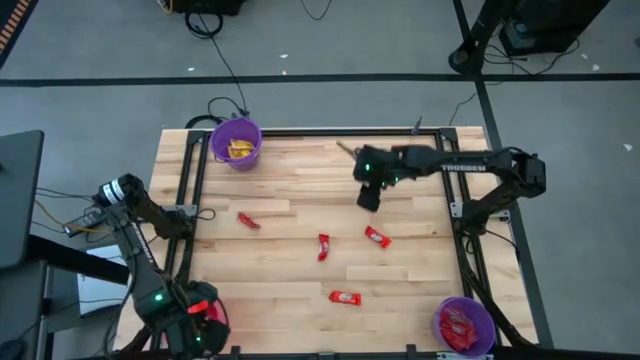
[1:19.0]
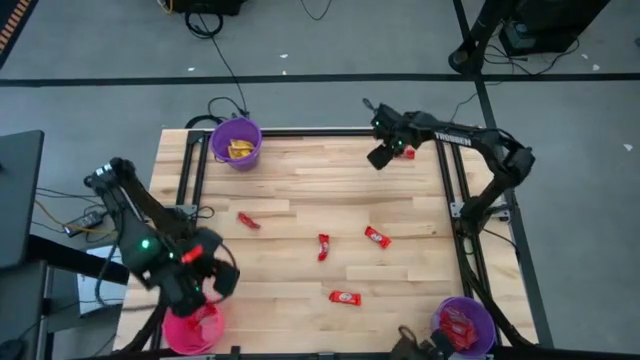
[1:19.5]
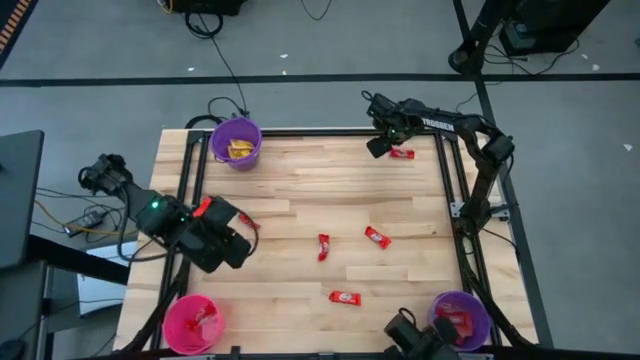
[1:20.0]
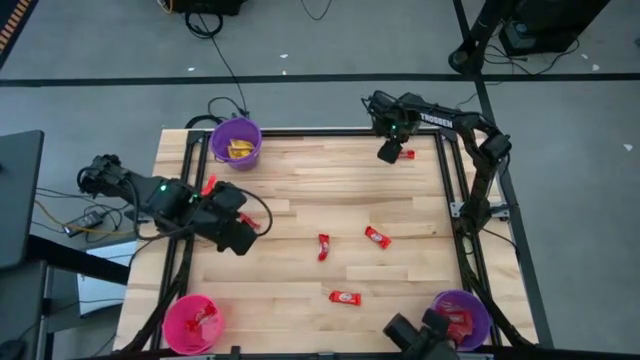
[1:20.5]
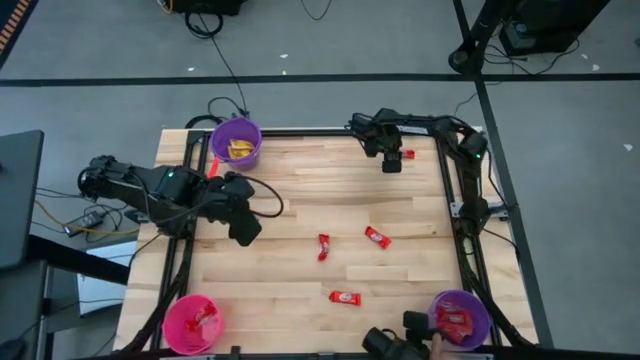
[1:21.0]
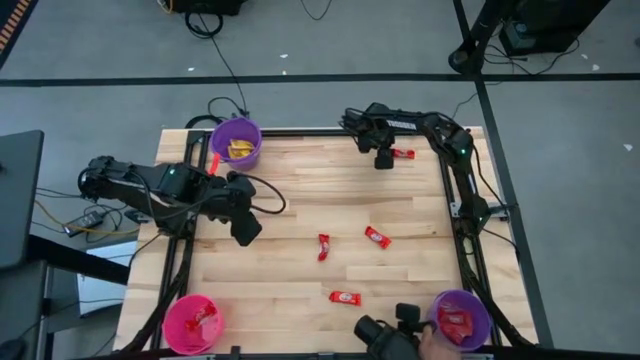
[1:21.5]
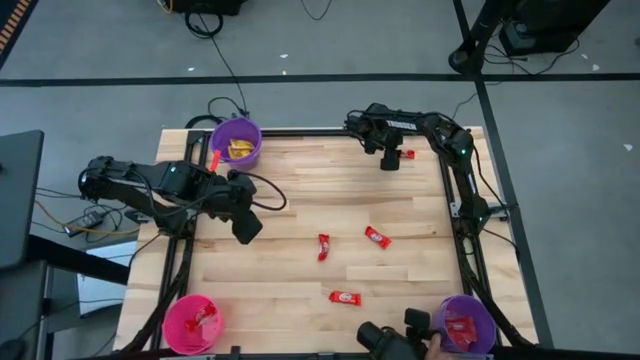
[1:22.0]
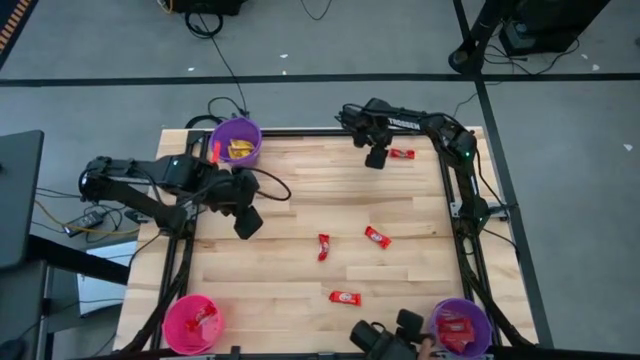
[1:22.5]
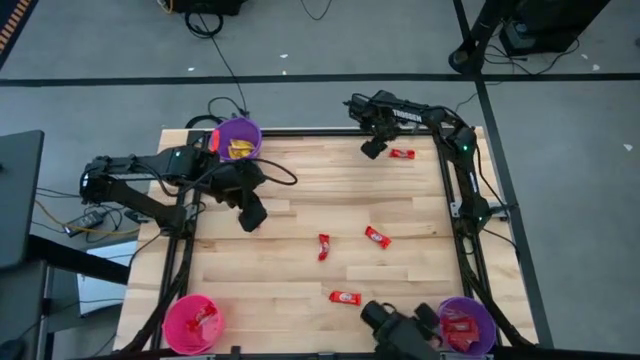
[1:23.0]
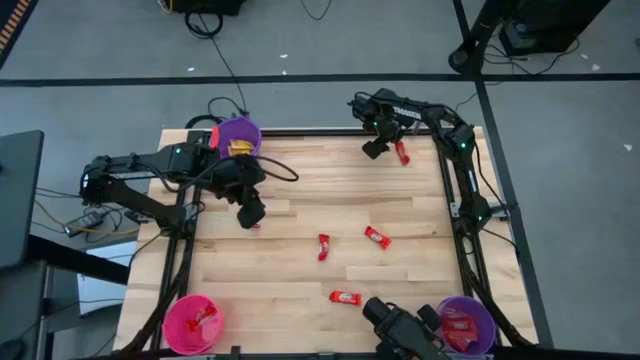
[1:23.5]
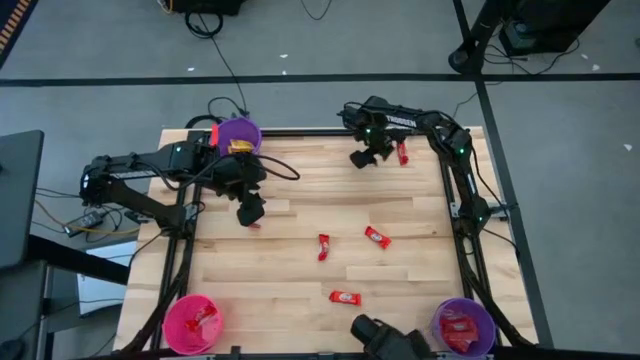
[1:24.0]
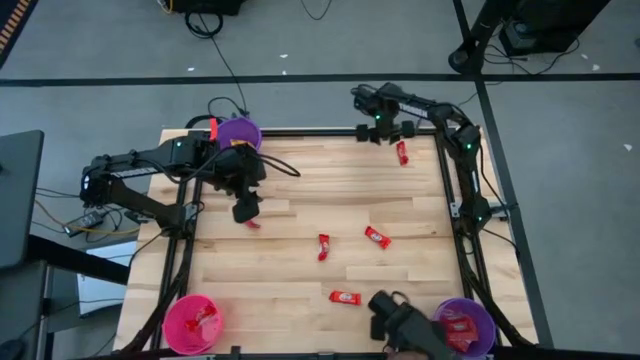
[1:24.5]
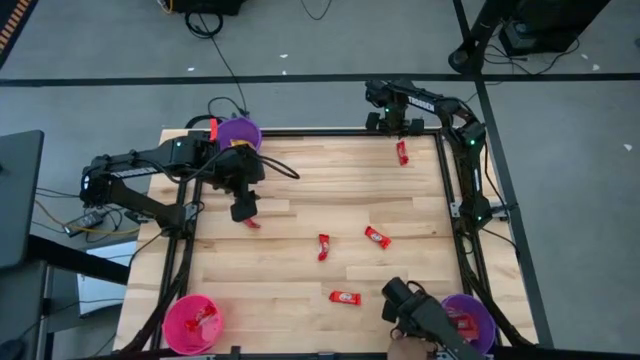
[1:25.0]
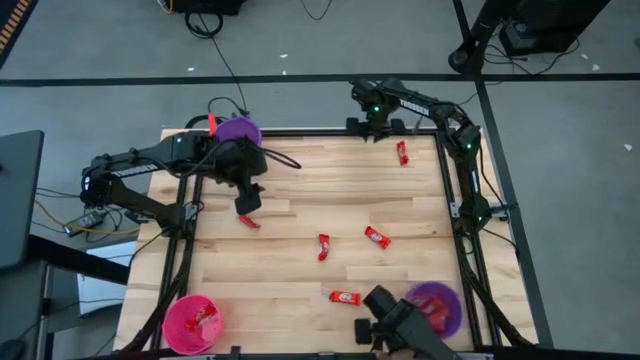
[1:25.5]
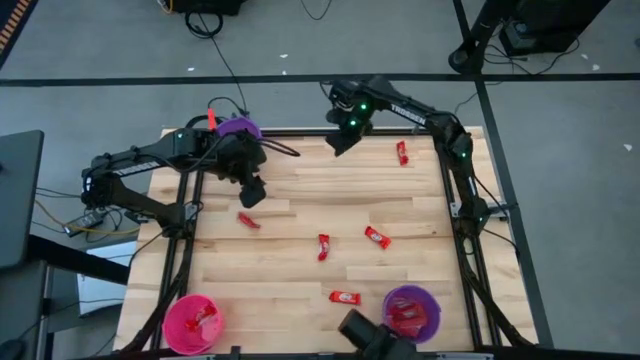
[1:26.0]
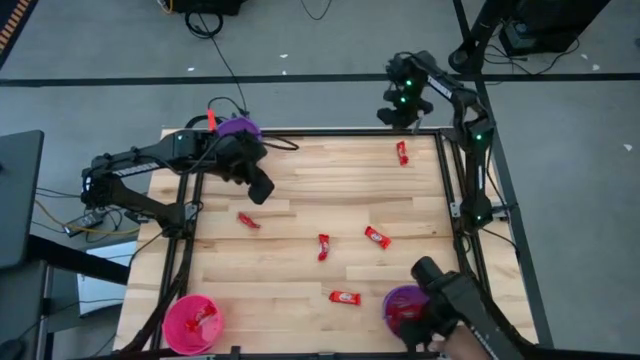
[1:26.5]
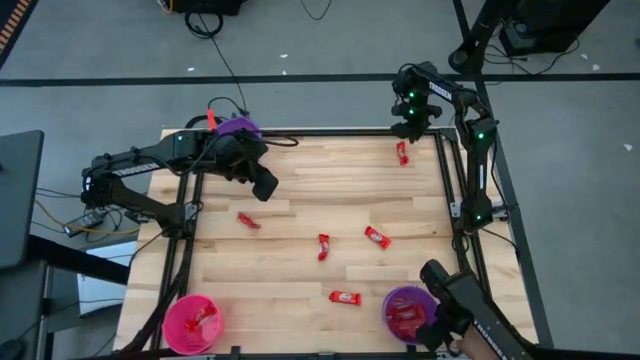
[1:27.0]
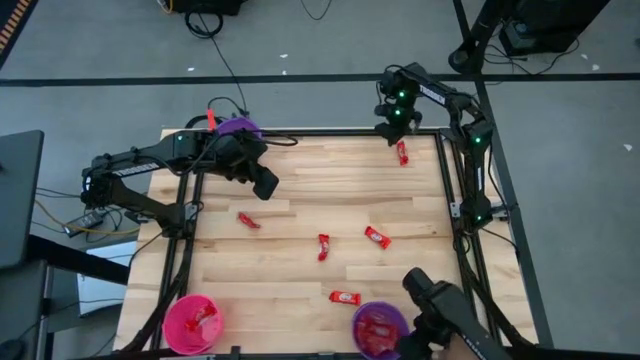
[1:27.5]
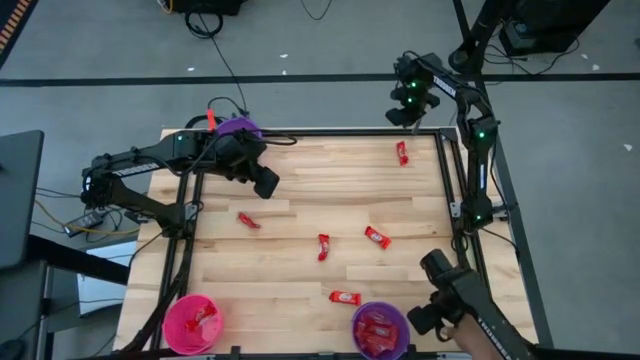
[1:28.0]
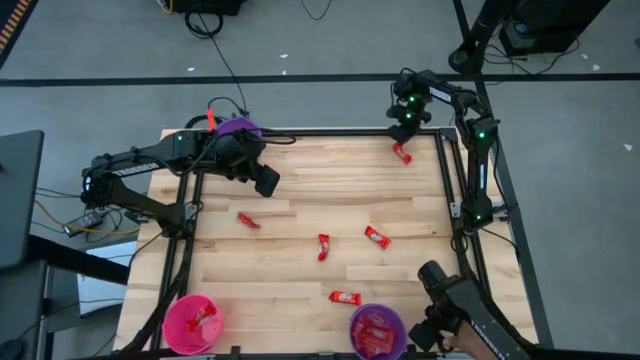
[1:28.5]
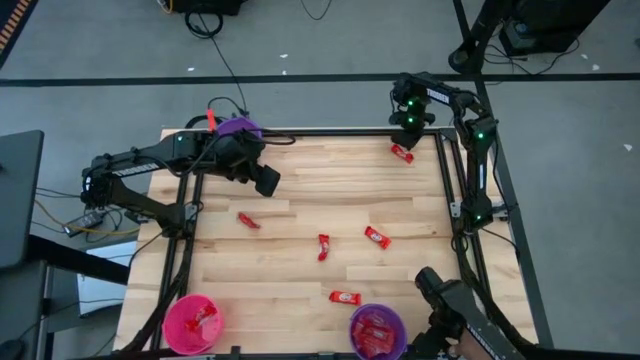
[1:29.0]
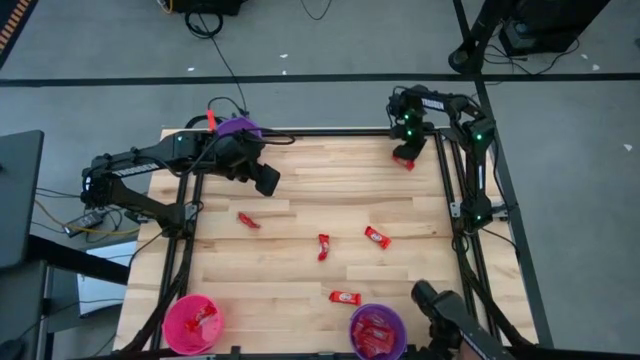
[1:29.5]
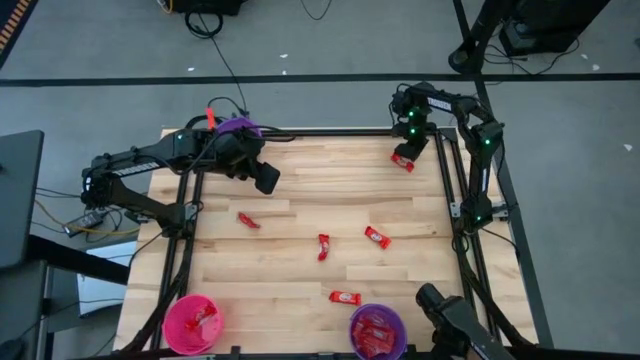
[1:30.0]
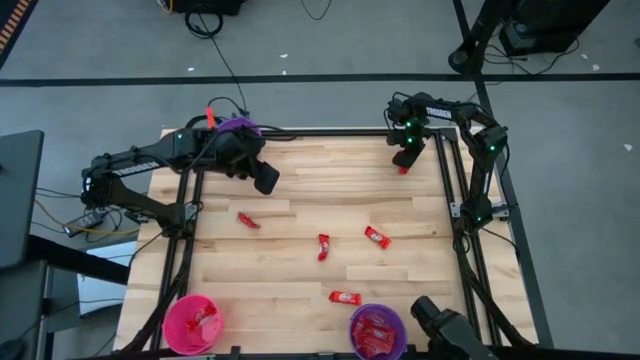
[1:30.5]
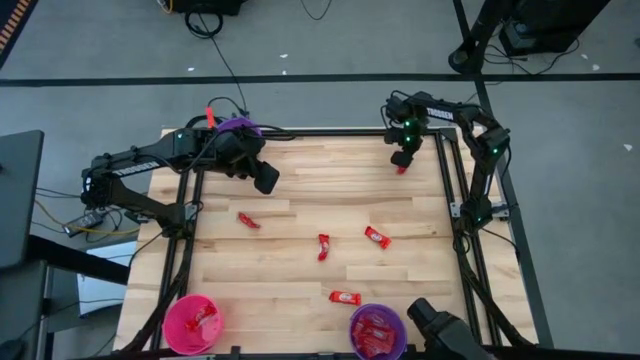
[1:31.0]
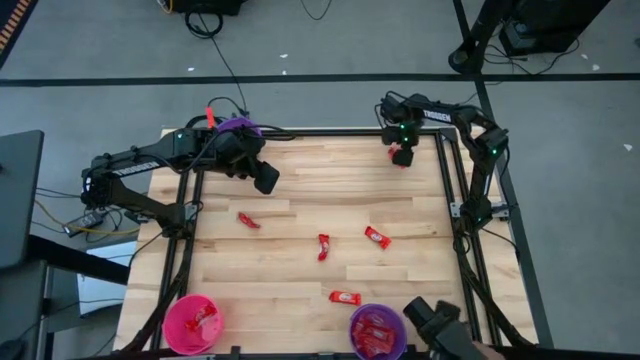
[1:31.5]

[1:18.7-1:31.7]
Task: Sort candy by brand, put in halloween buckets
Put the red chocolate into the pink bucket

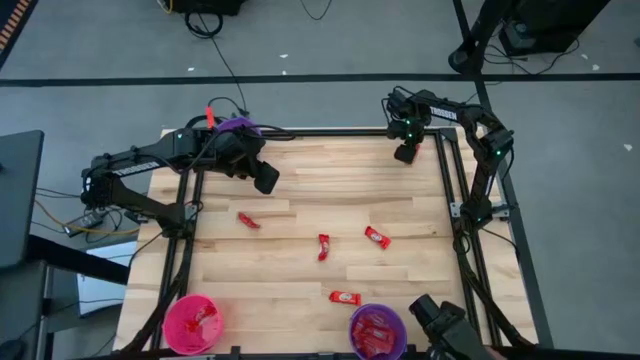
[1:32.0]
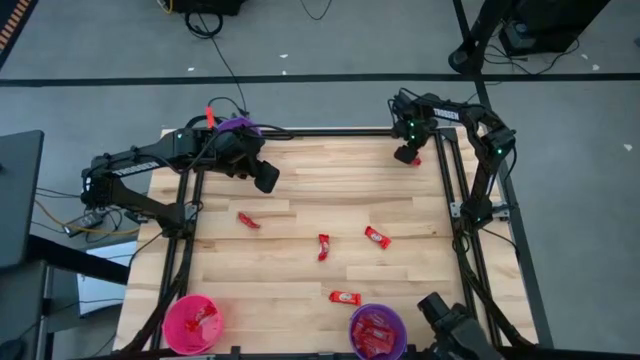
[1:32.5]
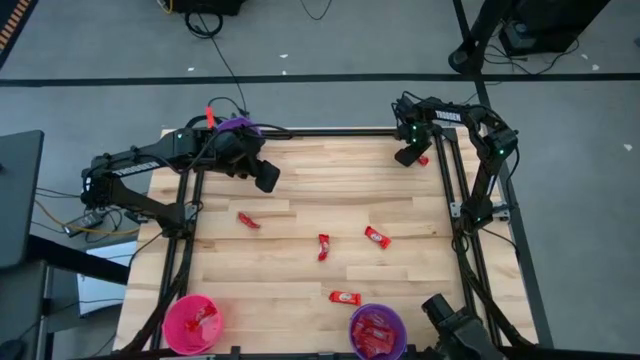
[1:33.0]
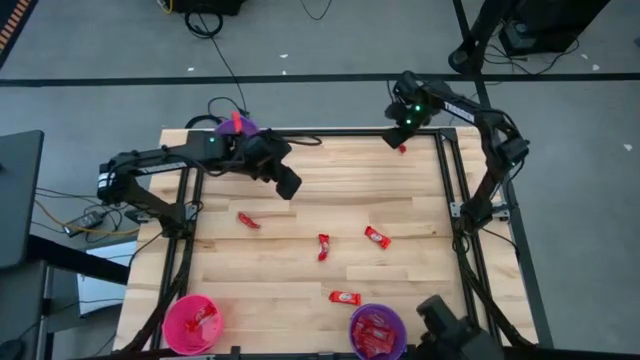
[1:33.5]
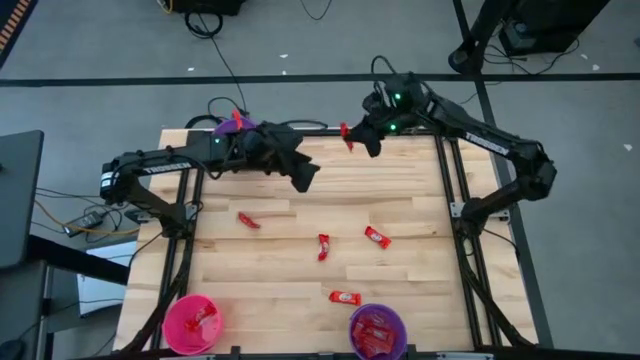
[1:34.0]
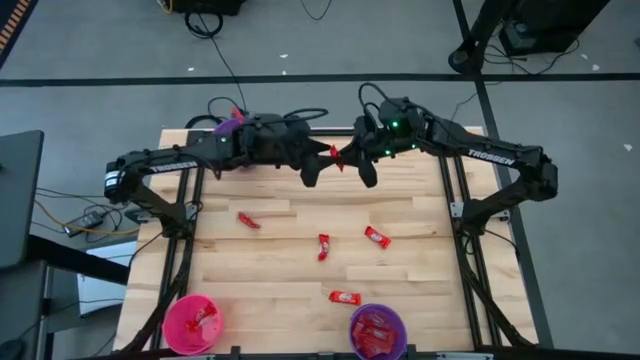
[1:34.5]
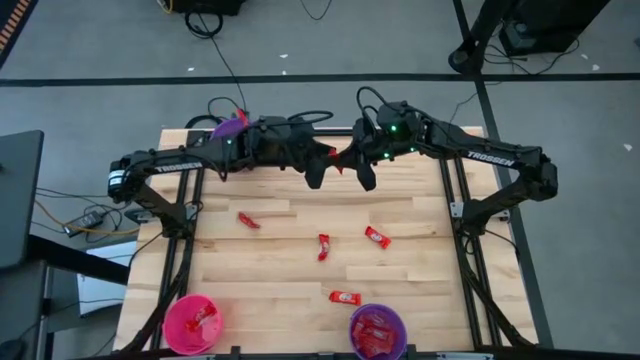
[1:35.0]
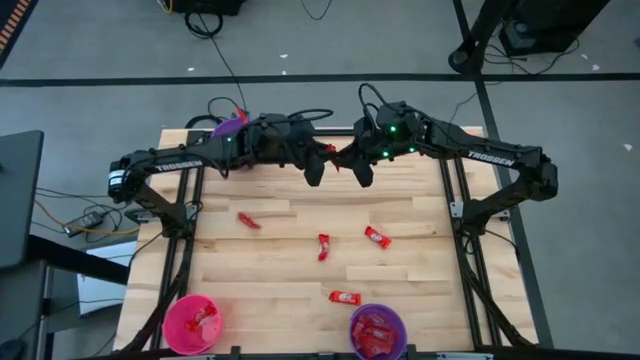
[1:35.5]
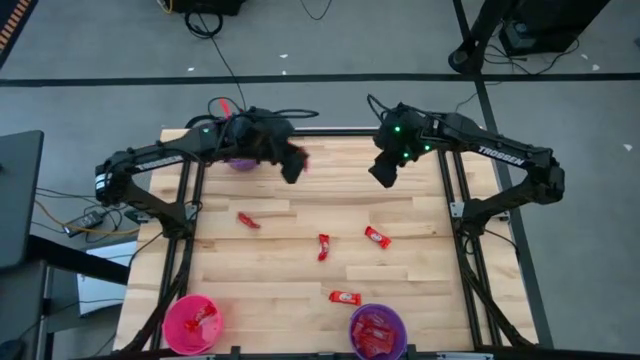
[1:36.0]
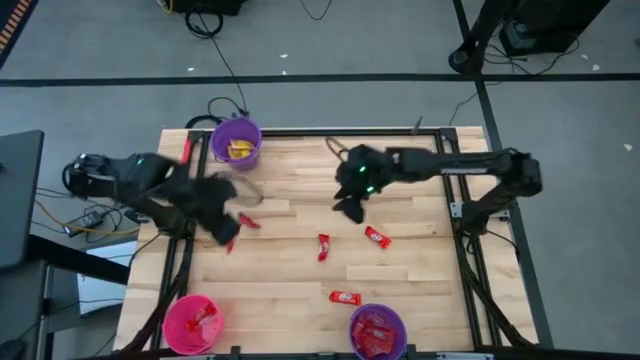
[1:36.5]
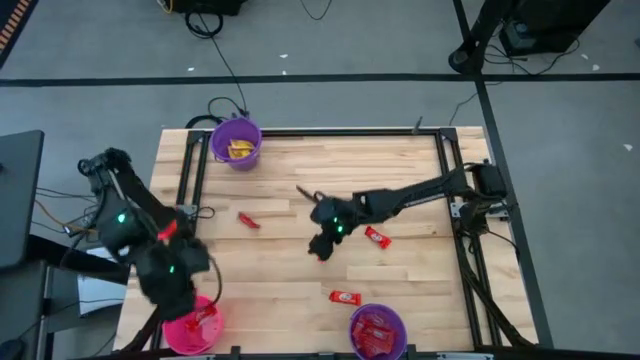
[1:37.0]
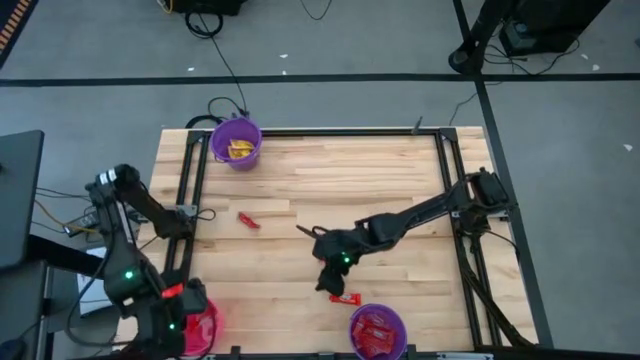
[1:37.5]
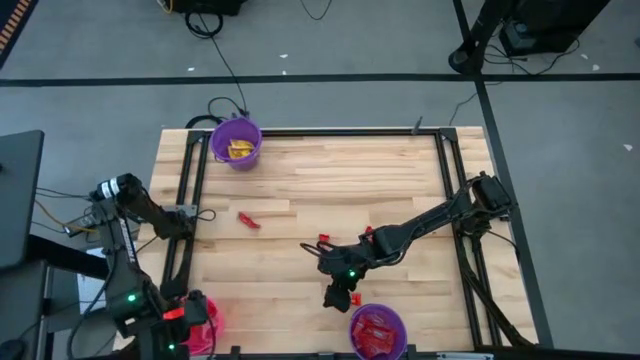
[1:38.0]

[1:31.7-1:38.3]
Put the red chocolate into the pink bucket

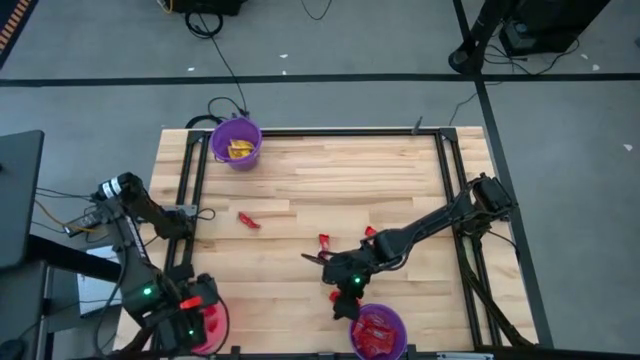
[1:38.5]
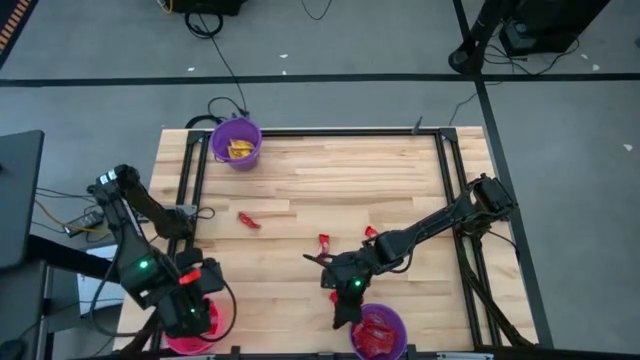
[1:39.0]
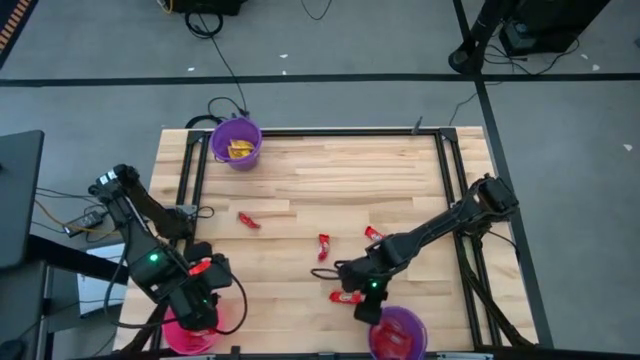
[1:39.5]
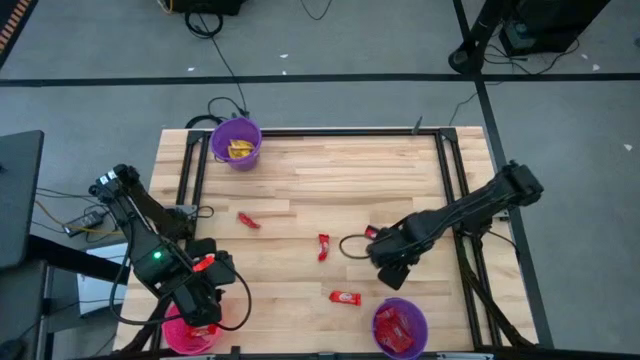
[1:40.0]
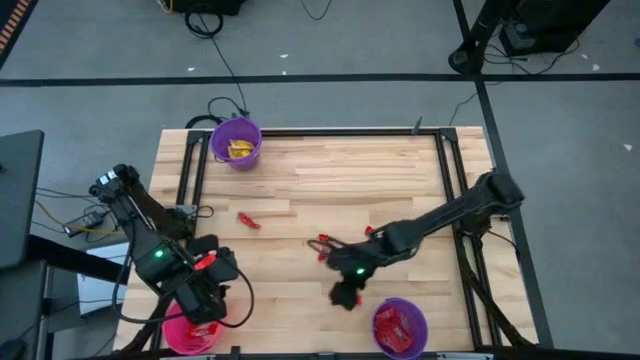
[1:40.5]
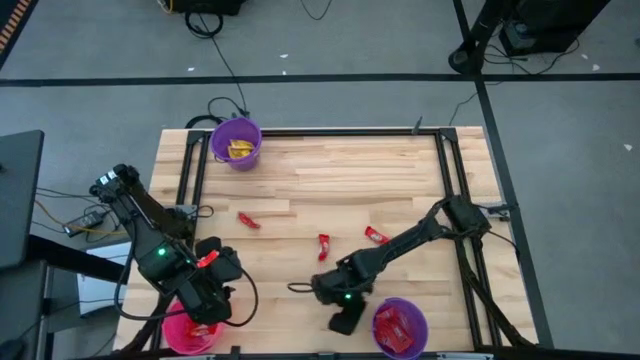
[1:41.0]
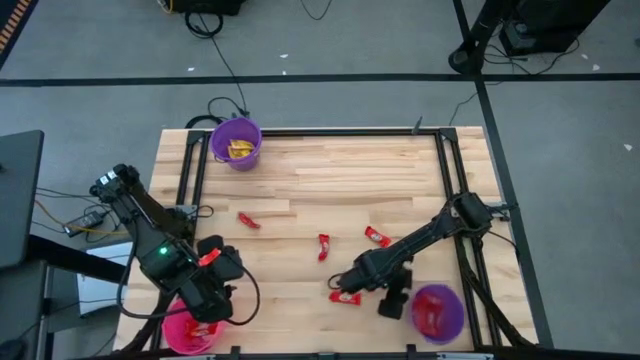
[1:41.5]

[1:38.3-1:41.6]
Adjust the bottom purple bucket
